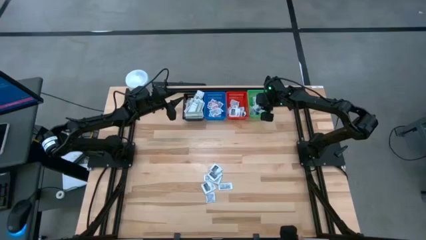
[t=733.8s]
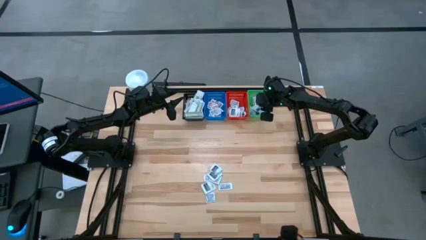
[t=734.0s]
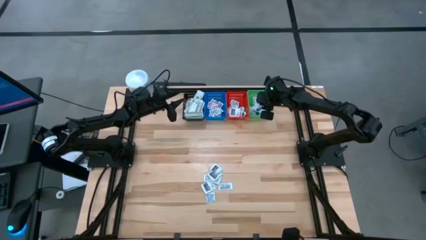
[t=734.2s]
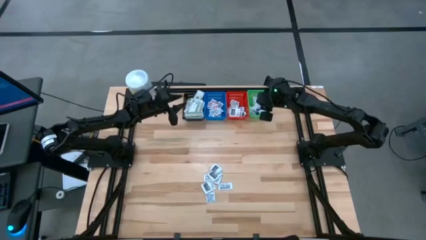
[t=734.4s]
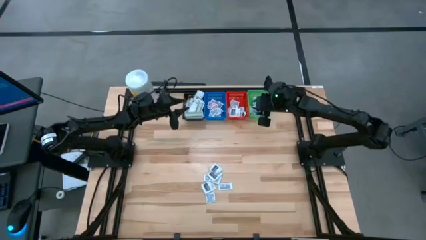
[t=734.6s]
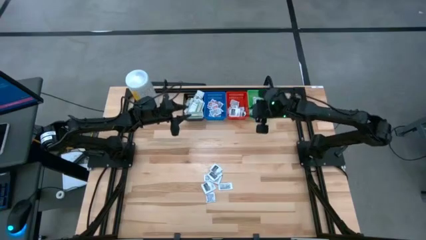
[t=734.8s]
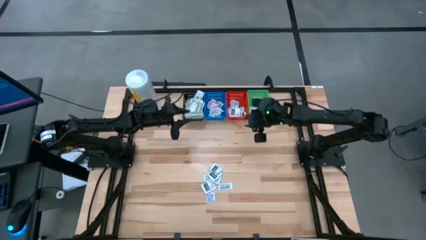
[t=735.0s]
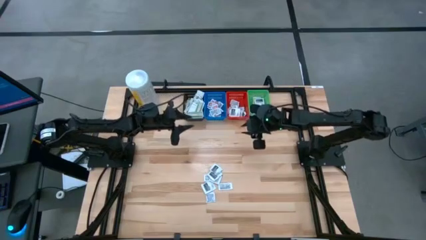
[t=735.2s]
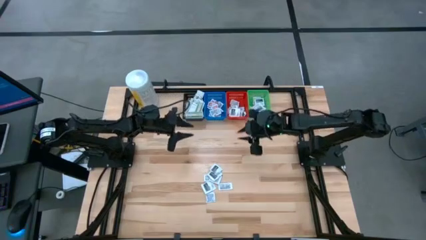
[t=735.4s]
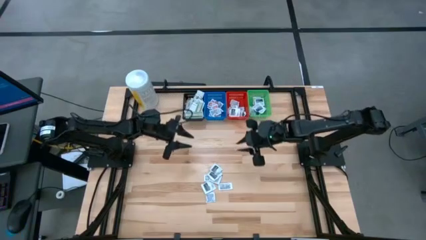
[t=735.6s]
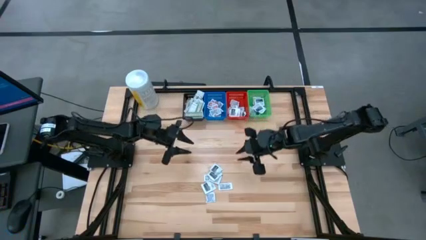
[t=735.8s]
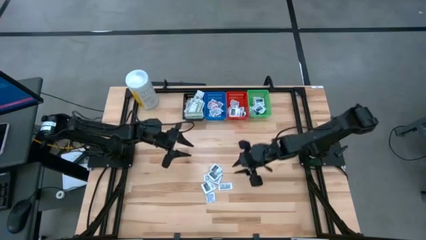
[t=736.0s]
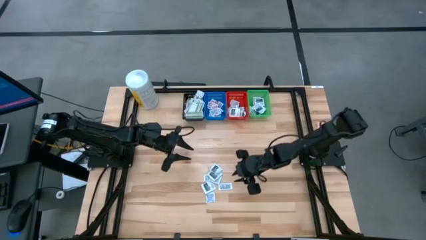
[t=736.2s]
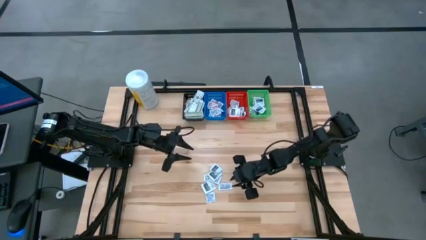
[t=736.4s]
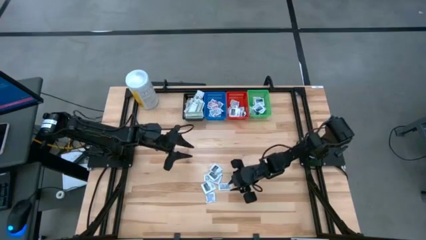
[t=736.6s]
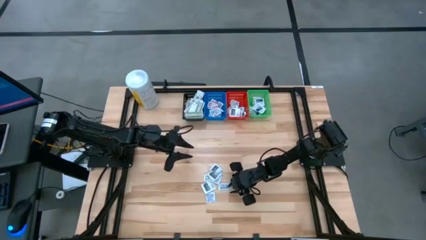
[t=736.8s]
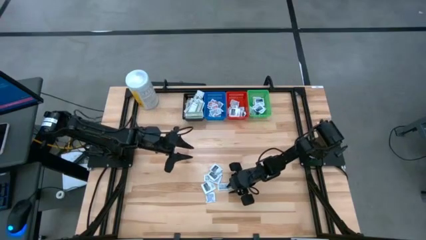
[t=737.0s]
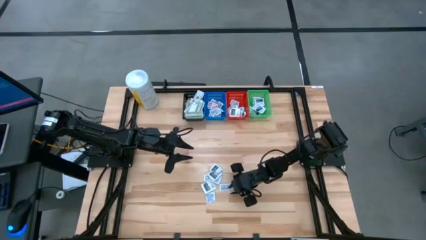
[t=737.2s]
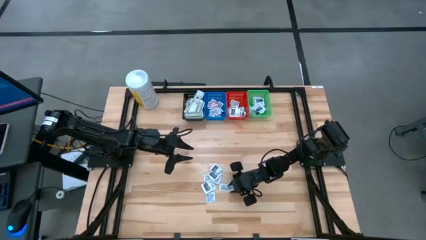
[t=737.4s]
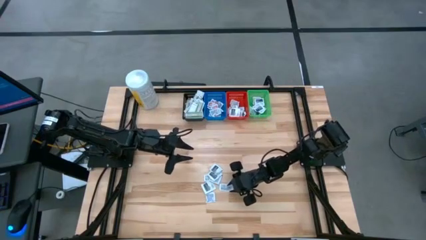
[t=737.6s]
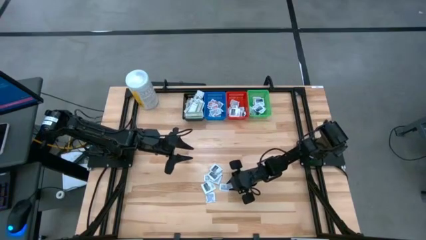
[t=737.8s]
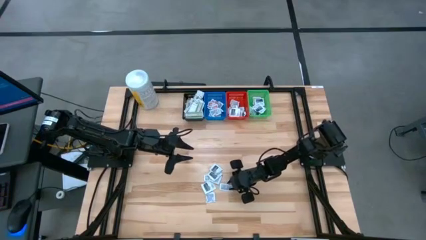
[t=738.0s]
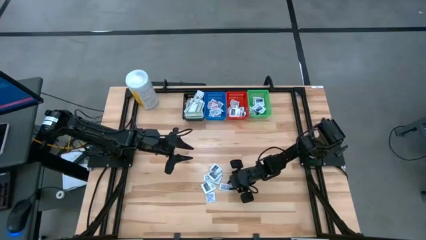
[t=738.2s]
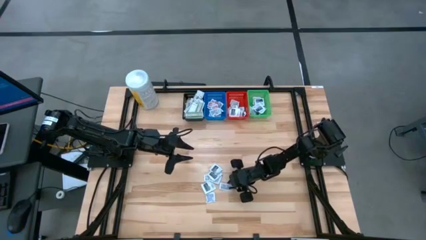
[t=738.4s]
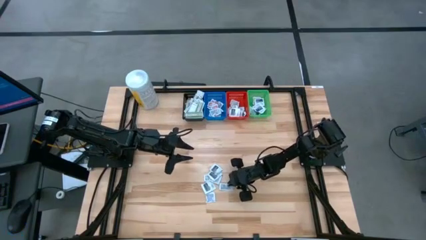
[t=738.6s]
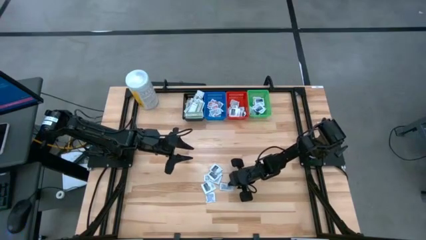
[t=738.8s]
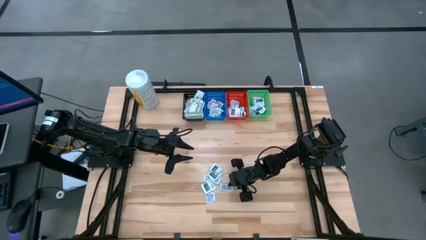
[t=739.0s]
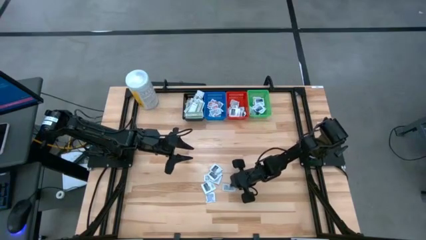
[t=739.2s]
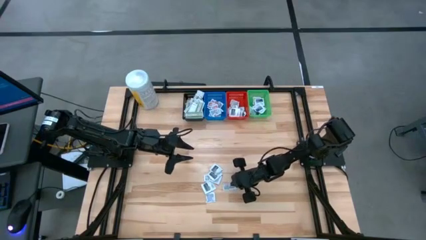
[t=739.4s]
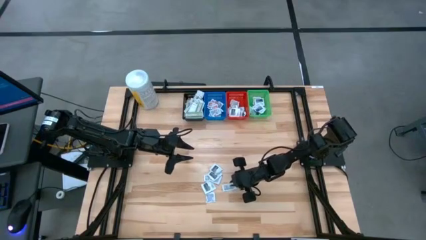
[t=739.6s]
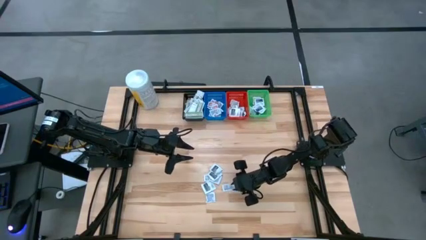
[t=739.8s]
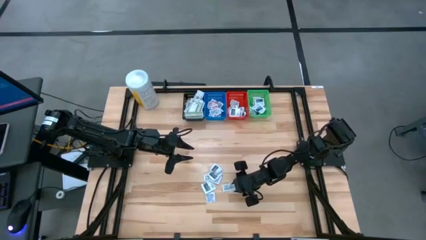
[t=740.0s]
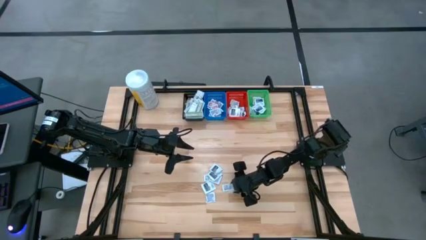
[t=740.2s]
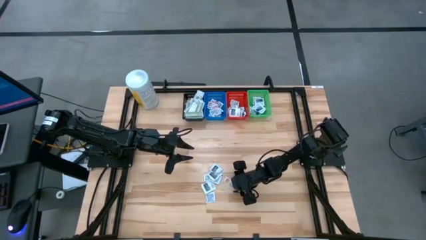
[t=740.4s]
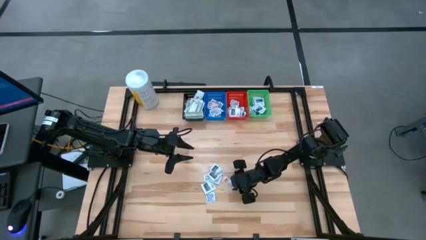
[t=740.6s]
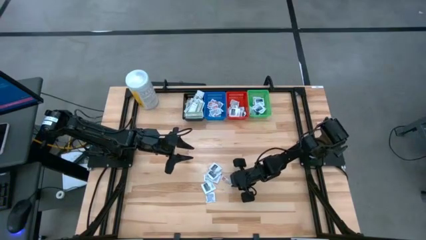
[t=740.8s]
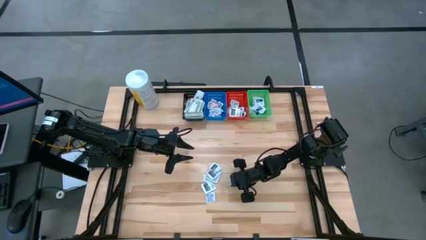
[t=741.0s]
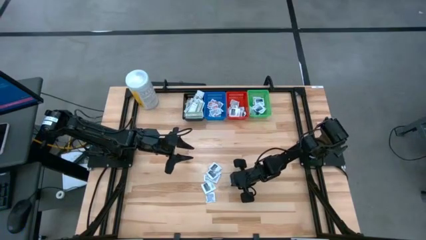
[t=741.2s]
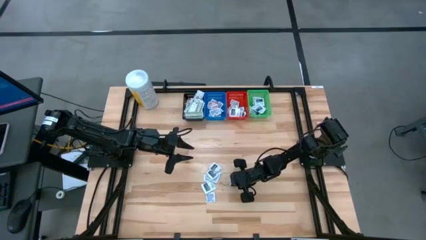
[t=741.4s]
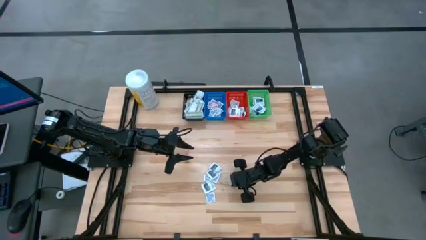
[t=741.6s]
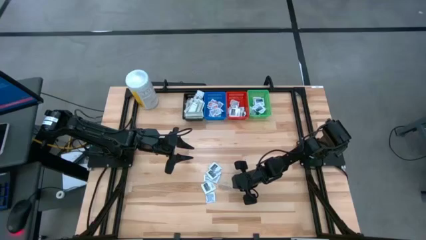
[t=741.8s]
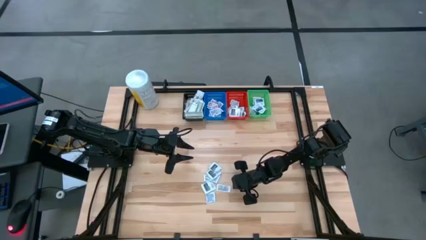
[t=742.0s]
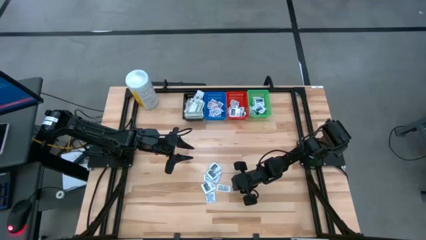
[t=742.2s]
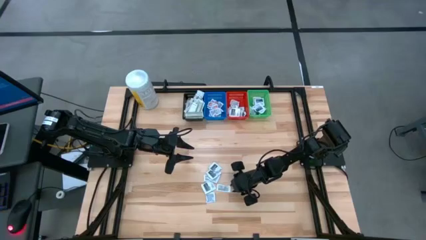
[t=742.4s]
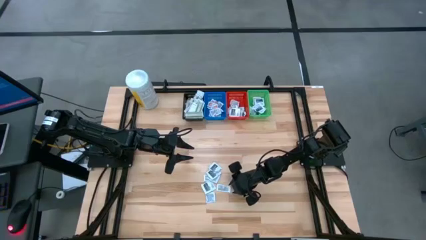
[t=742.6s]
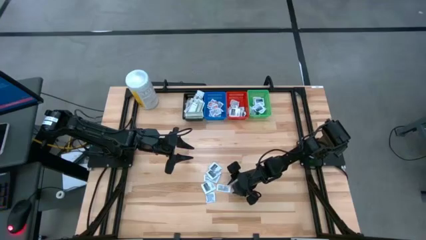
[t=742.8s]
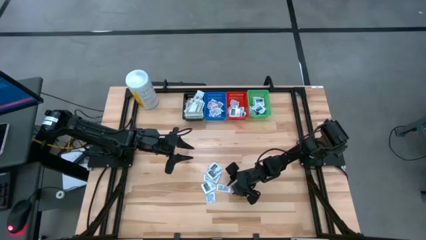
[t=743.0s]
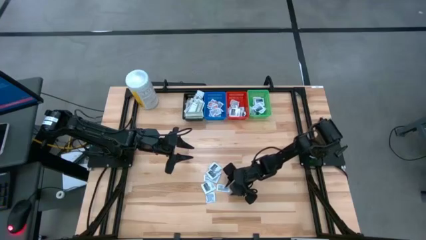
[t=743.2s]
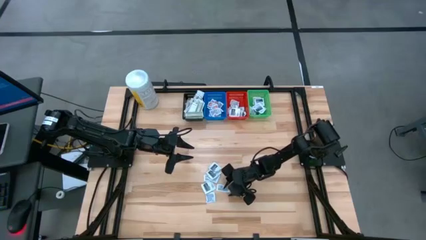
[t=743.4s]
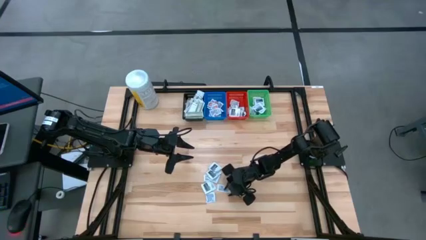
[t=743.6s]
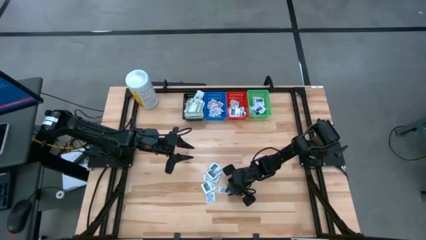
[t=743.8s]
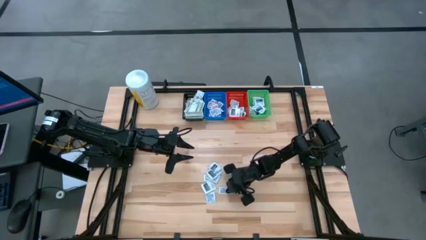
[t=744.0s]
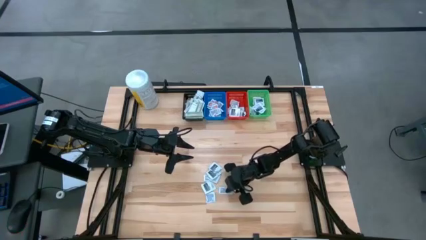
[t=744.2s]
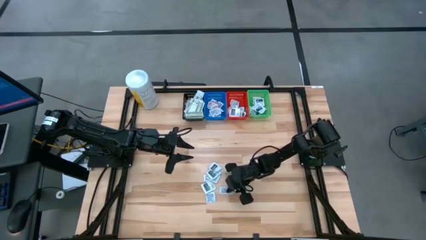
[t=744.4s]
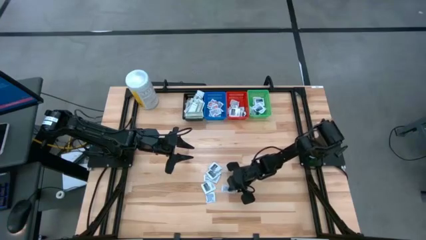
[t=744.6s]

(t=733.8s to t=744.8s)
Task: Pick & Place First Aid Supplies
Put the orange ointment pack in the blue bin

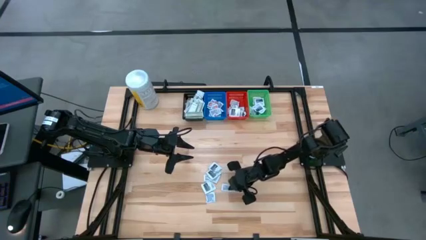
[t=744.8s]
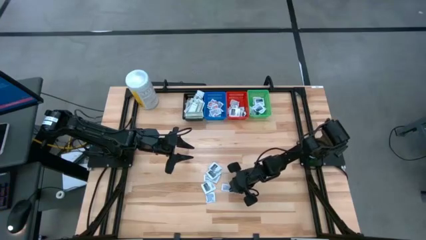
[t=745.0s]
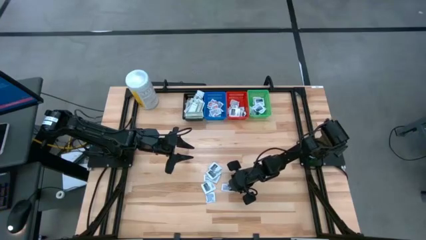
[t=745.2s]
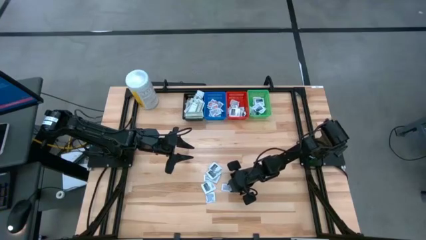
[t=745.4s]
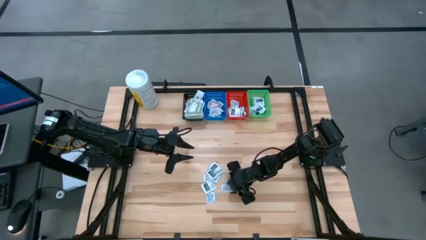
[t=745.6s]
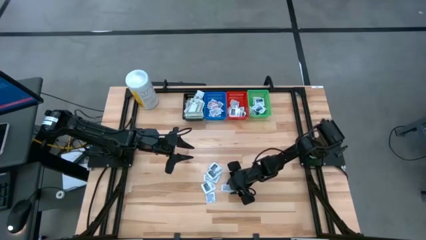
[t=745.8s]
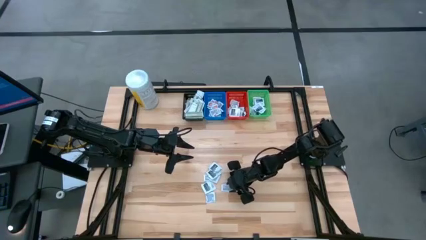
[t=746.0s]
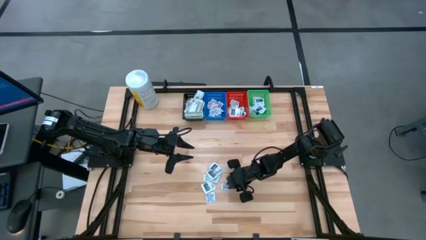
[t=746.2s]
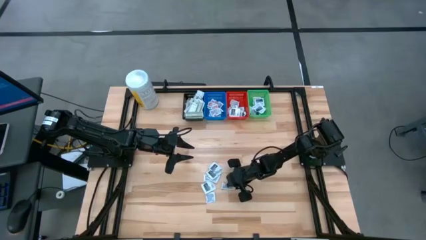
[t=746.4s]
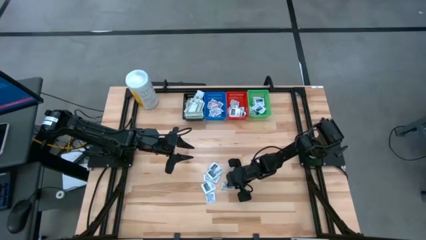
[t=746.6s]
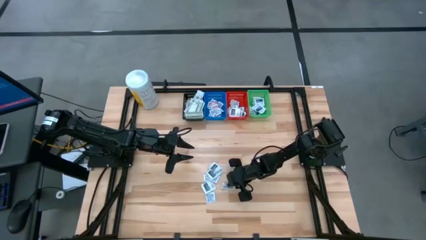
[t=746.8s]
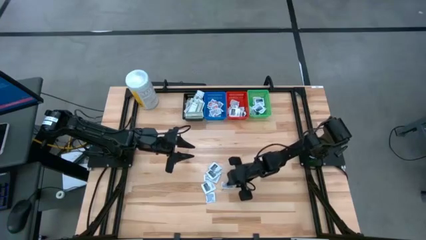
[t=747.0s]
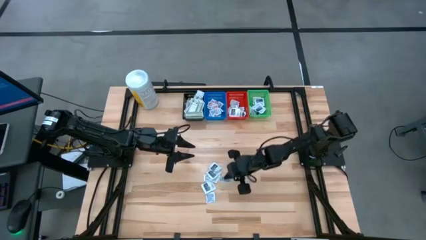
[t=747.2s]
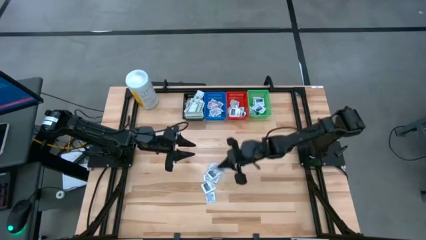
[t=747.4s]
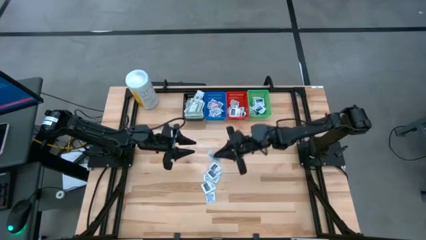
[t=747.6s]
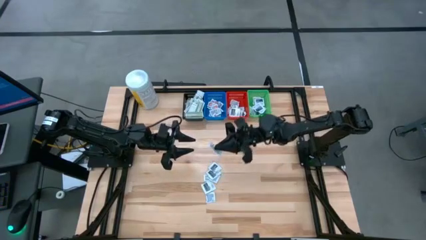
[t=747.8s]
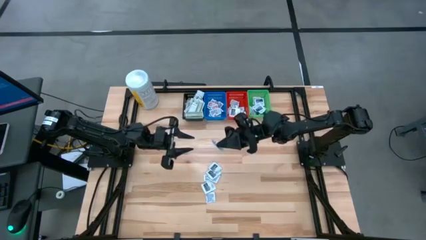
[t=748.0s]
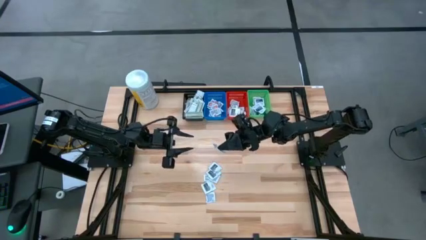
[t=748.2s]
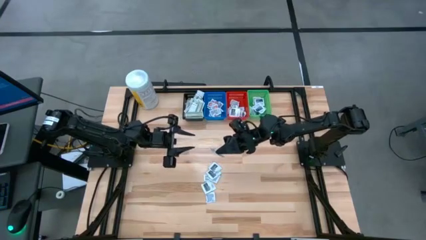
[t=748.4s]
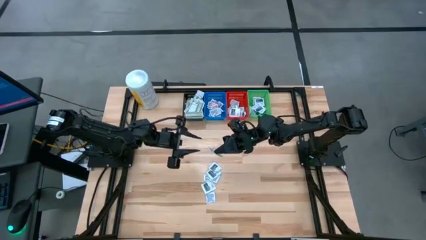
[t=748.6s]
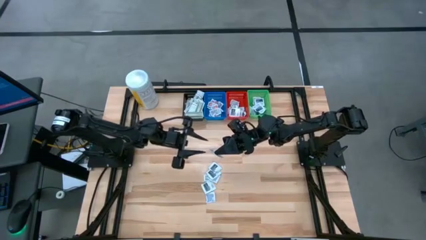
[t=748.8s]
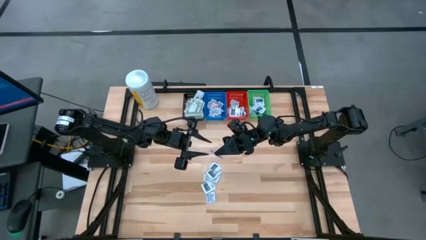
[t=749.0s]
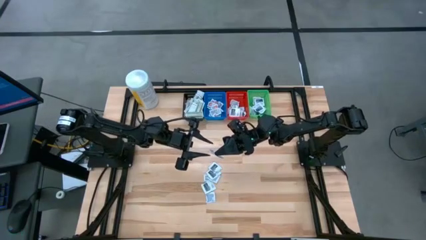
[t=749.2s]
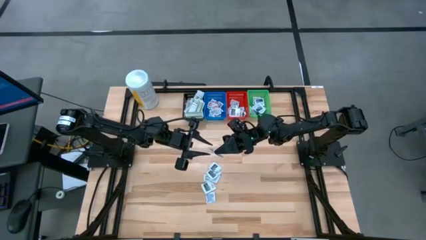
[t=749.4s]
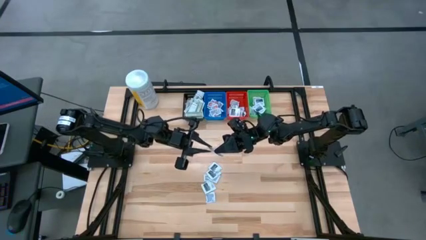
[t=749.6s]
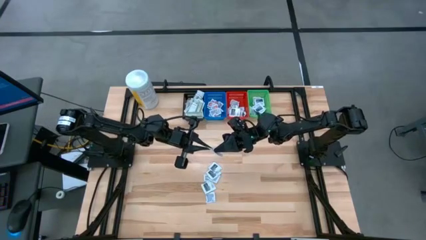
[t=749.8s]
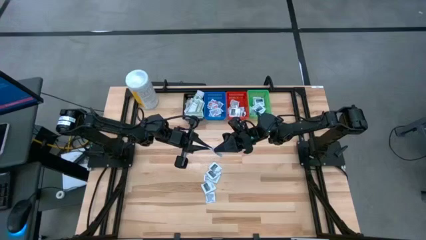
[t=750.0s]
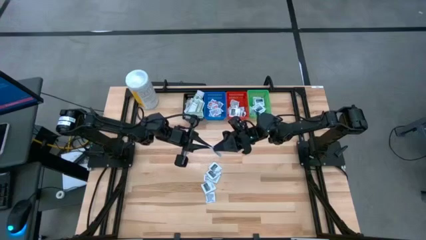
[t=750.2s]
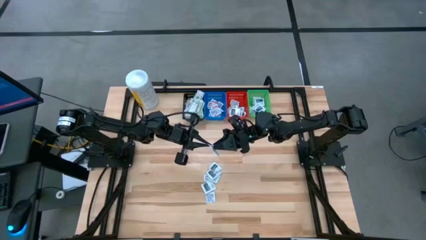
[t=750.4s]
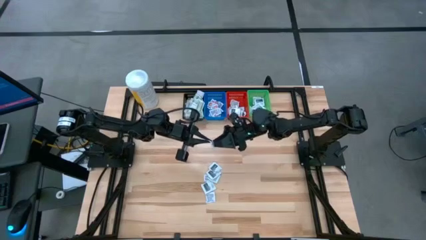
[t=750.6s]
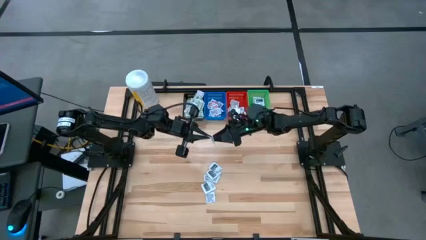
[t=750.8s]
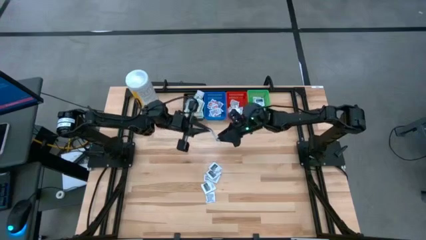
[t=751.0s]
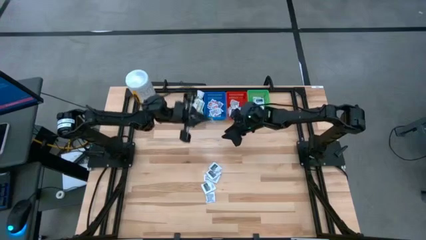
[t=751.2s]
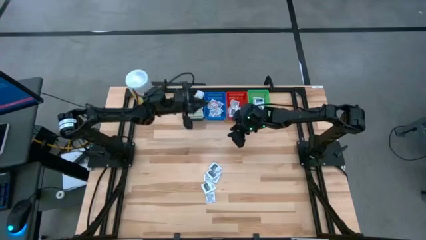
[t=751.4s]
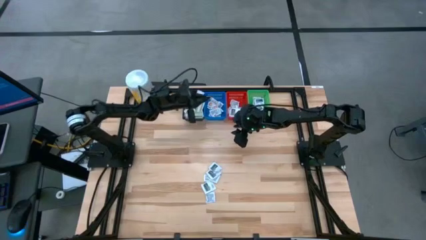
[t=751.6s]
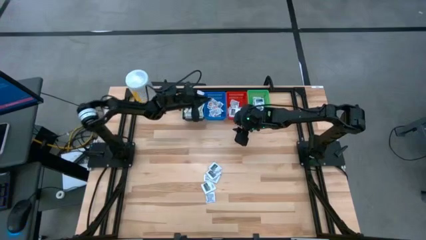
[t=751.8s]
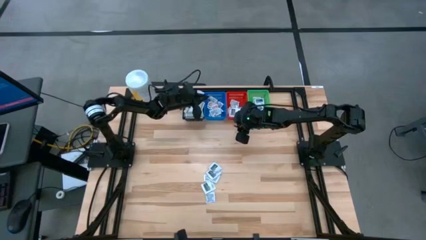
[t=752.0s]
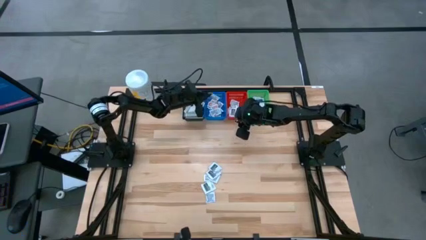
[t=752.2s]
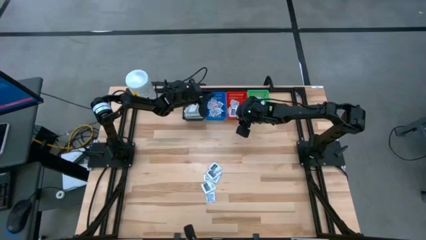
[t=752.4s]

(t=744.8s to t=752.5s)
Put the orange ointment pack in the blue bin
